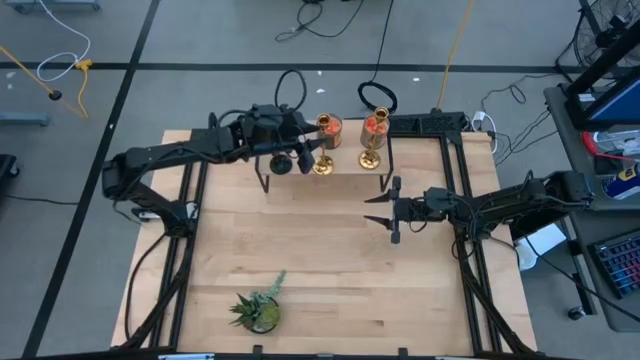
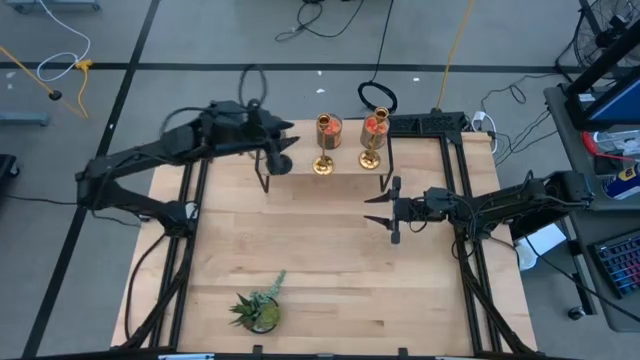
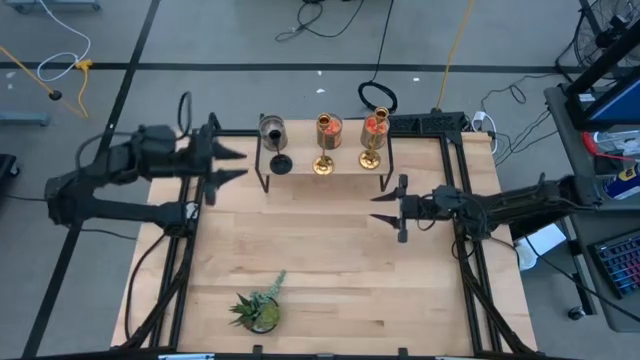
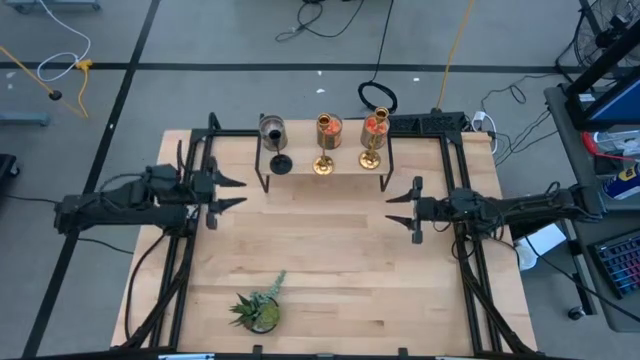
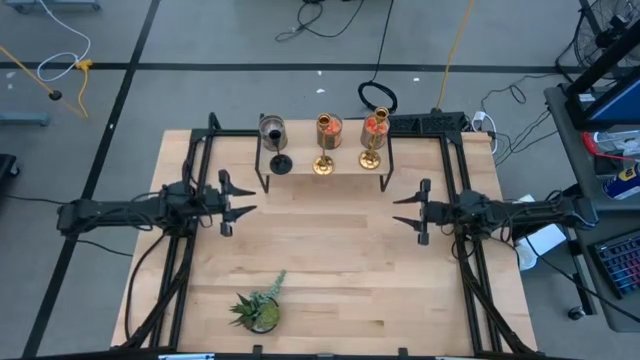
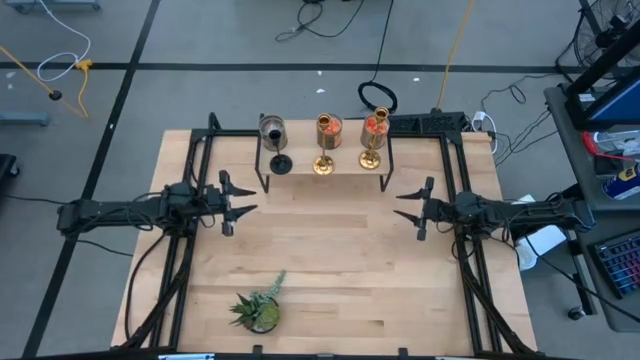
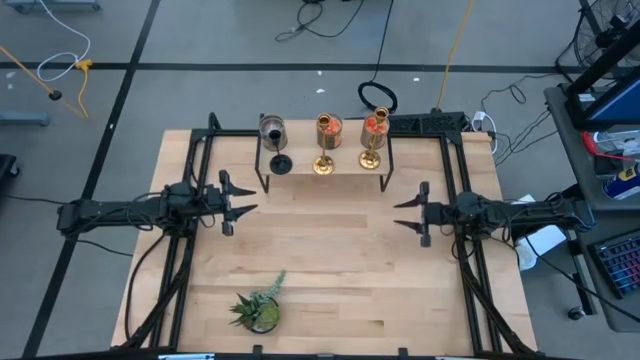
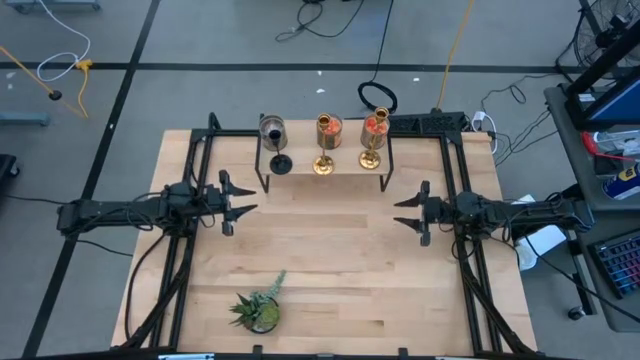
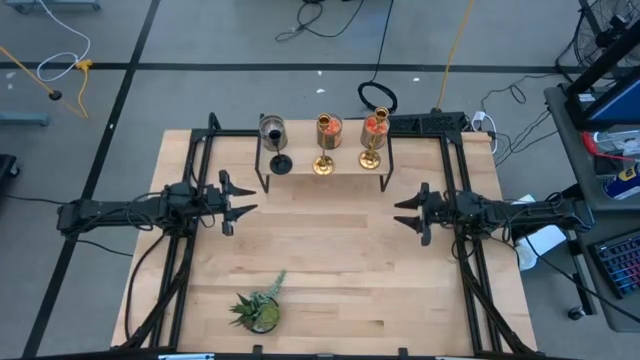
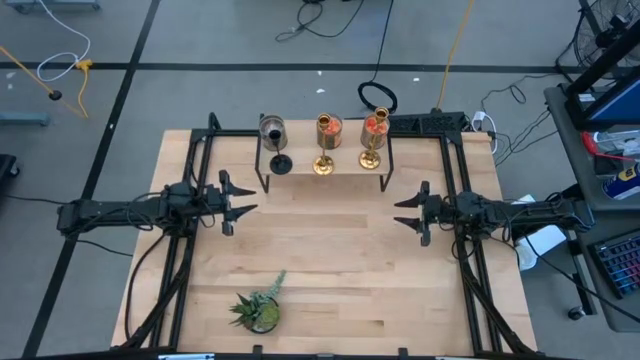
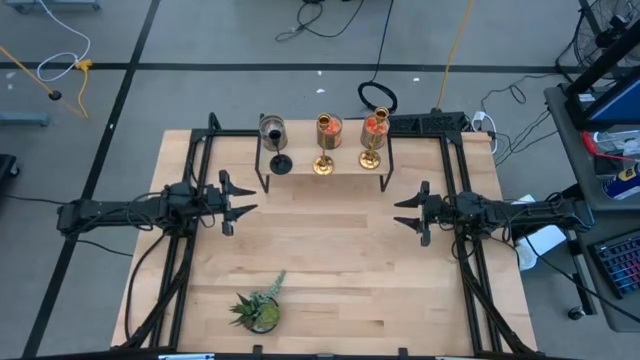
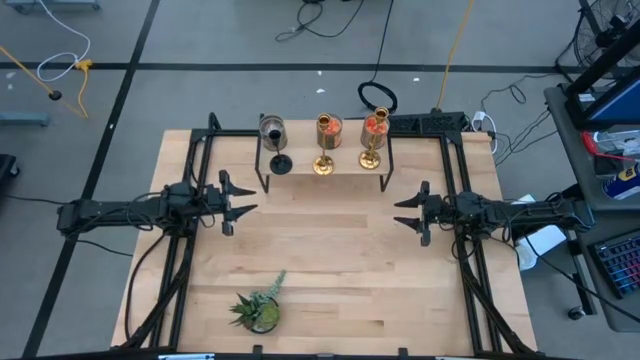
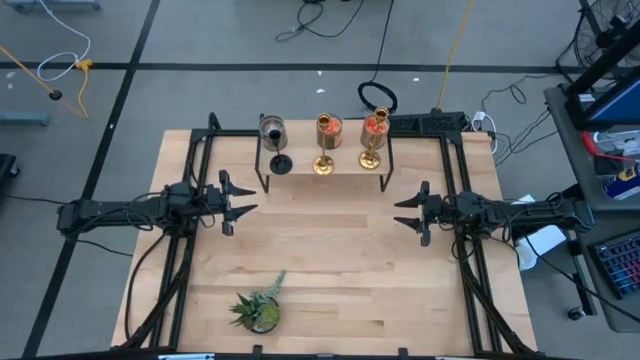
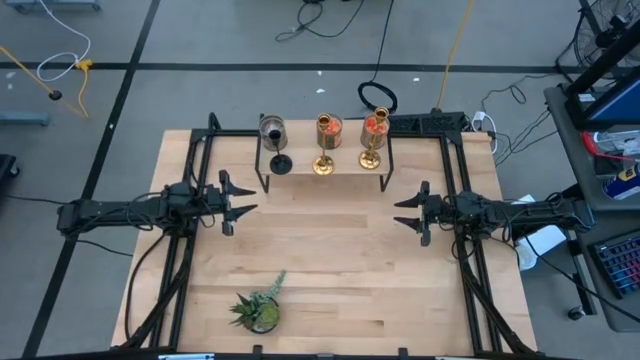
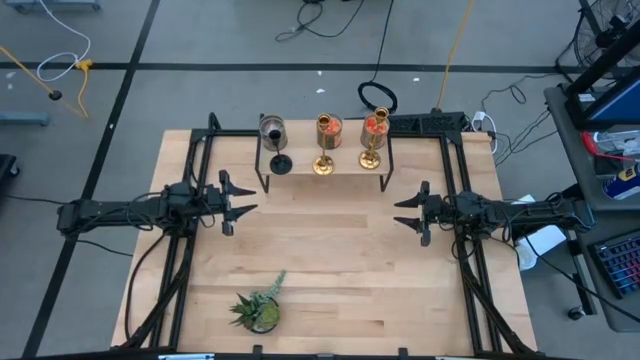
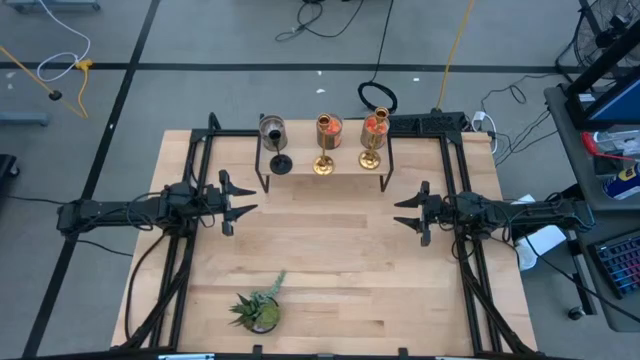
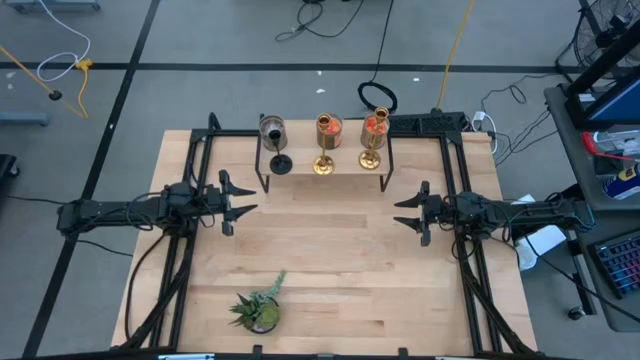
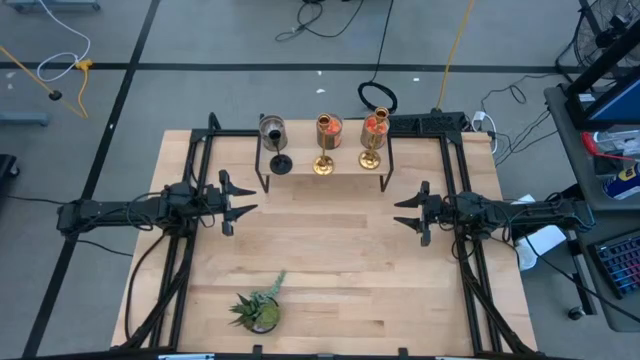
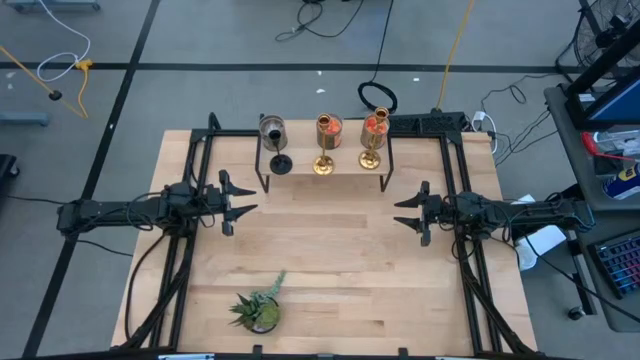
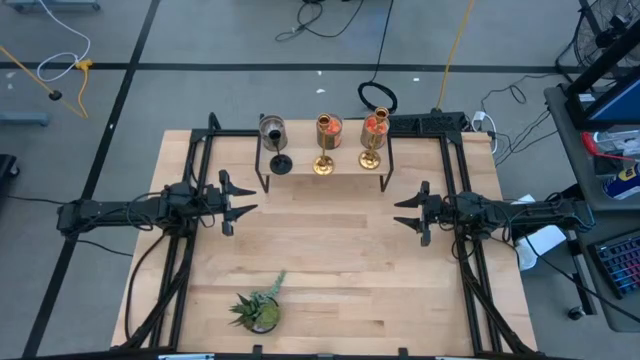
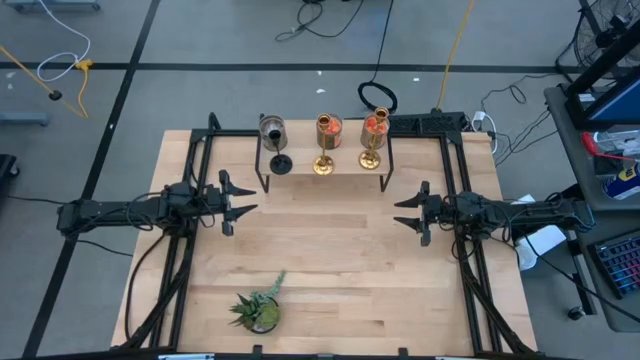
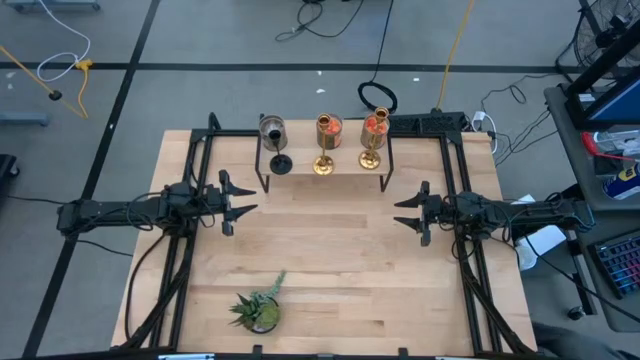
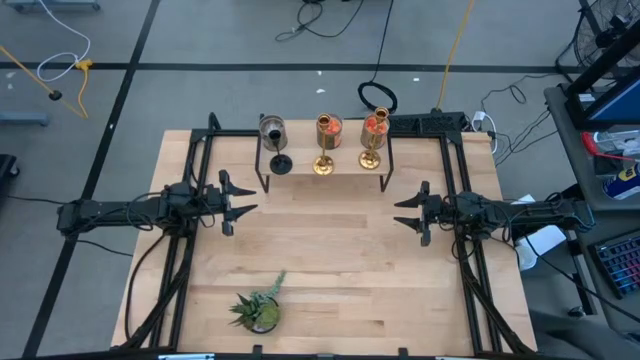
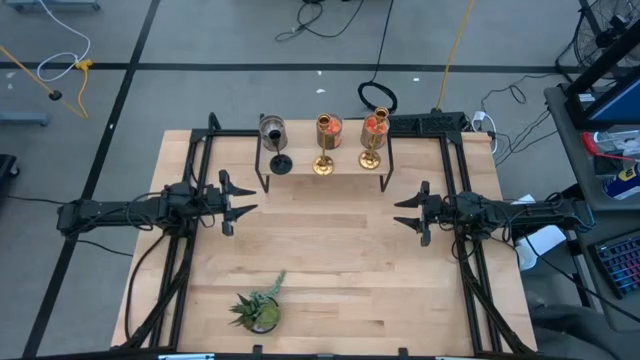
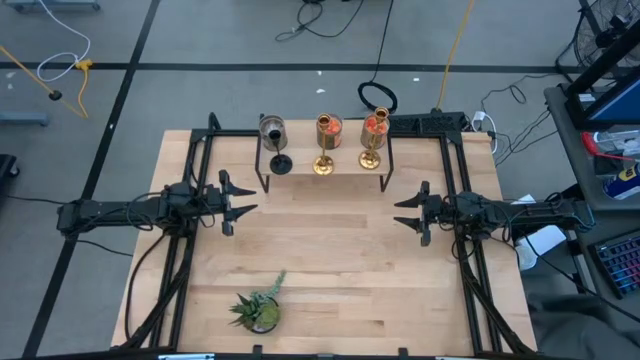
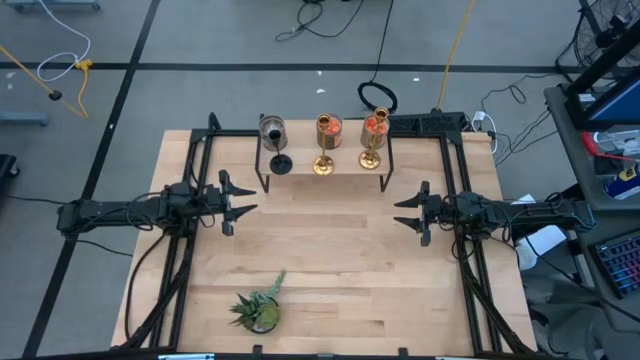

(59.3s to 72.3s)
Task: Pick & Place candle stick holders
Return to Home Position

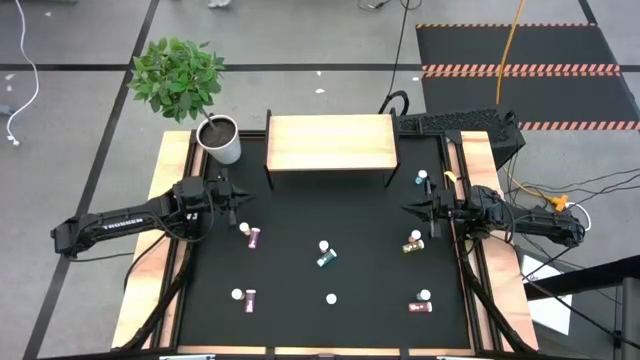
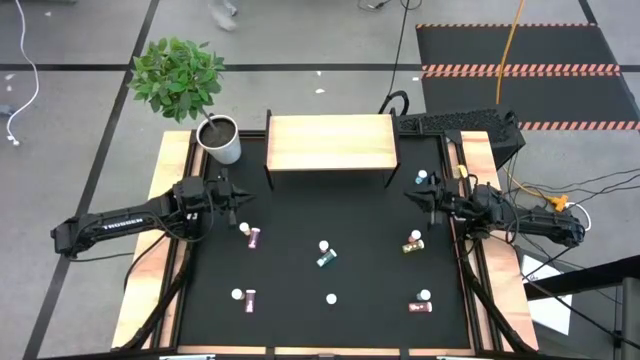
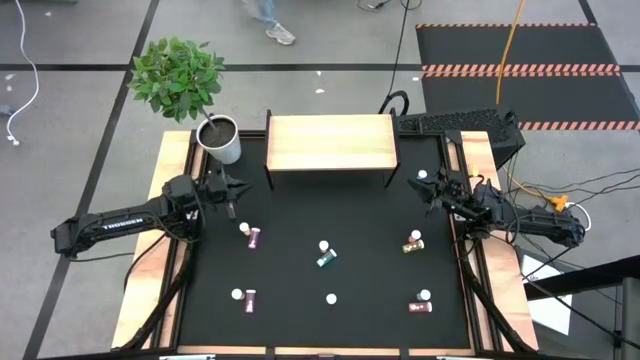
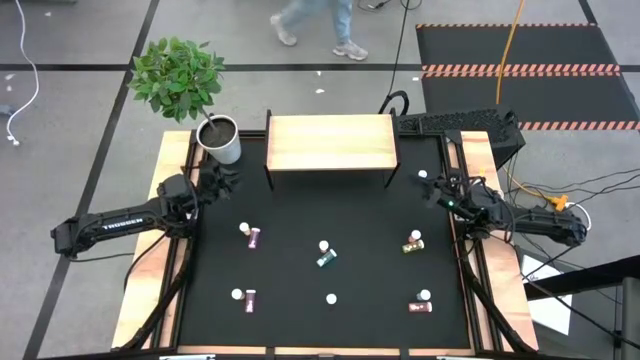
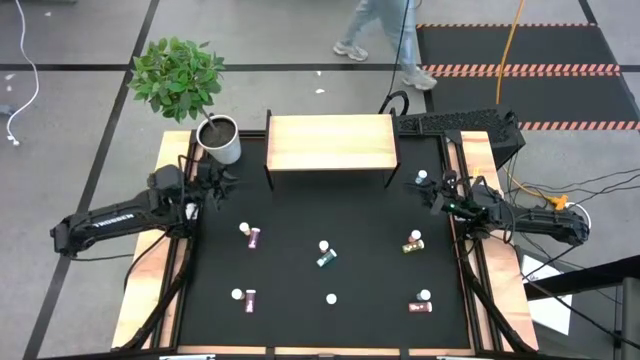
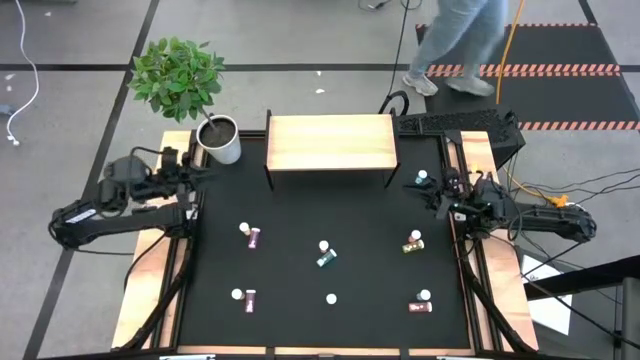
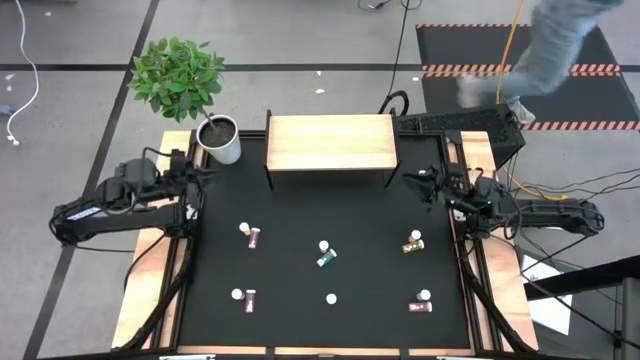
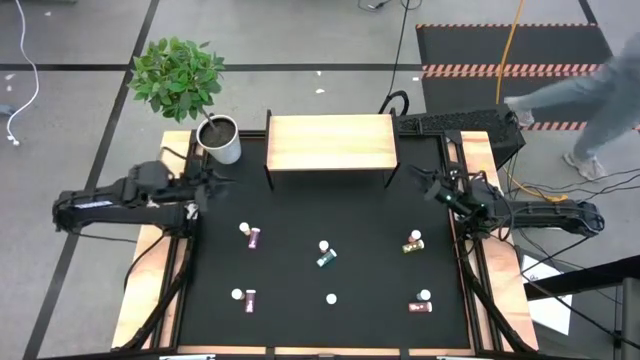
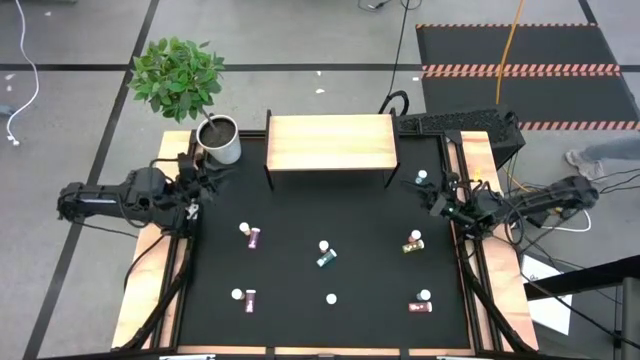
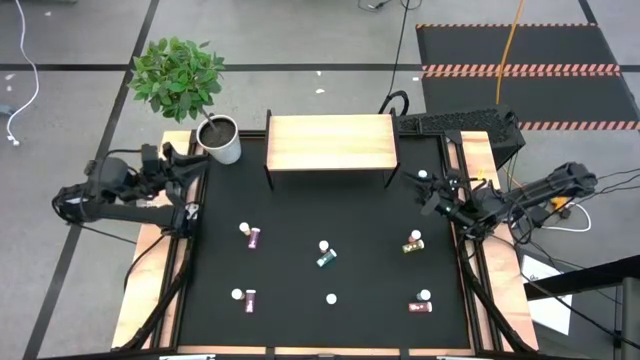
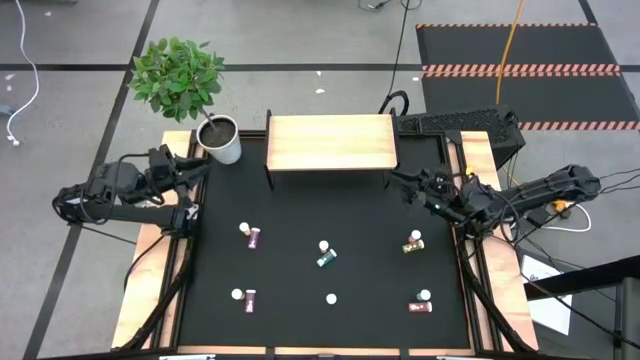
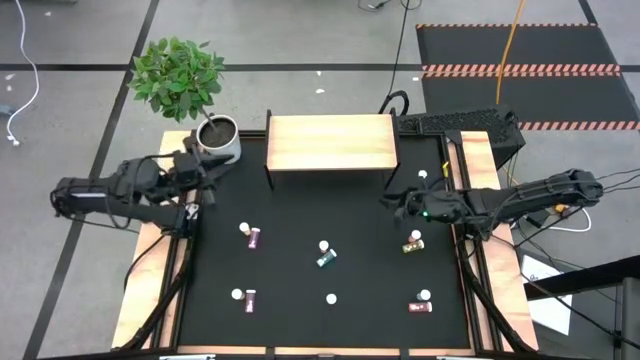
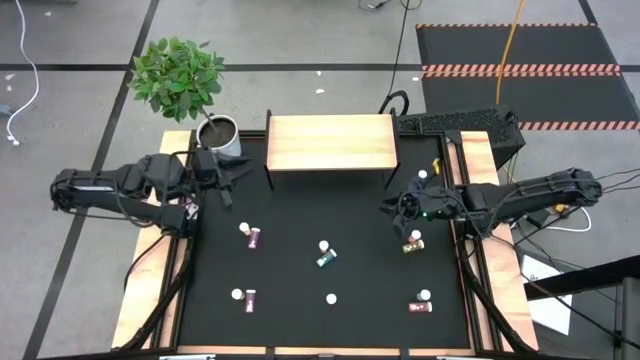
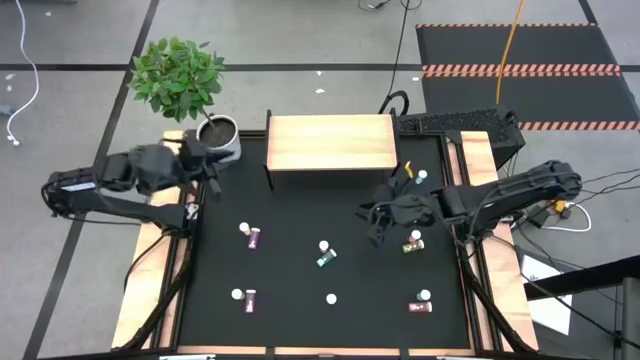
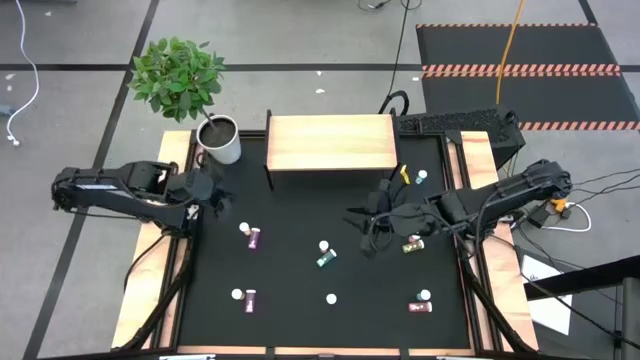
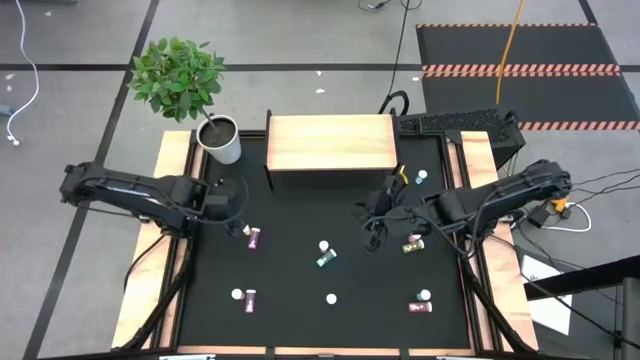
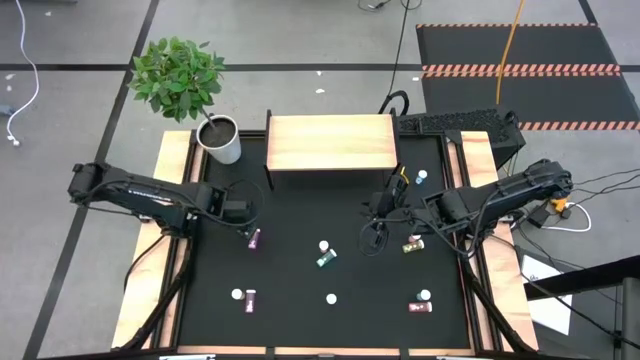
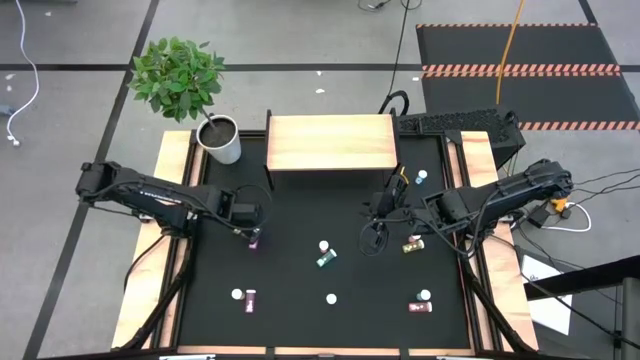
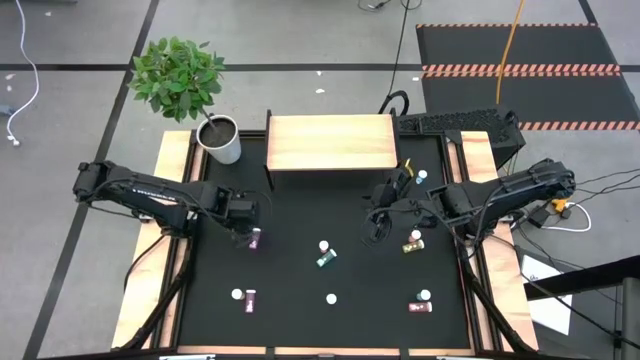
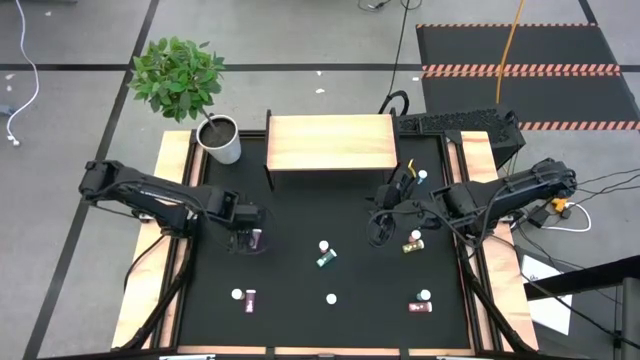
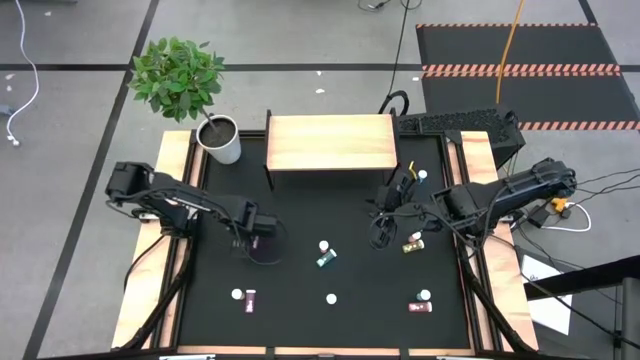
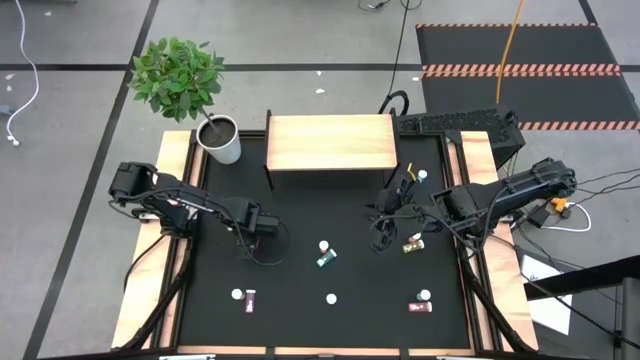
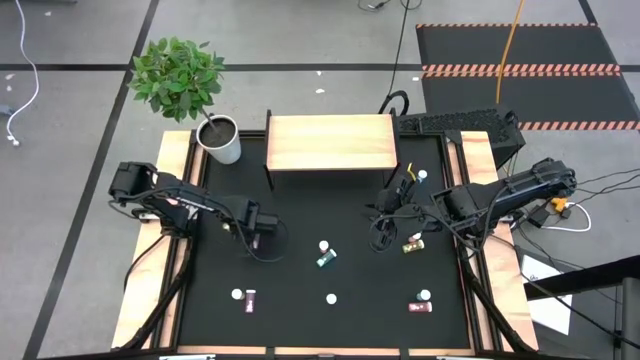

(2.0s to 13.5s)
Task: Pick and place medicine bottles onto shelf by color
Put the top left yellow pill bottle on the shelf
